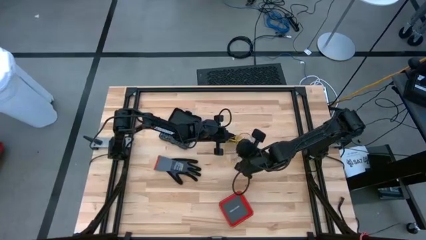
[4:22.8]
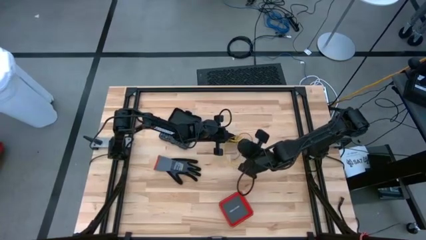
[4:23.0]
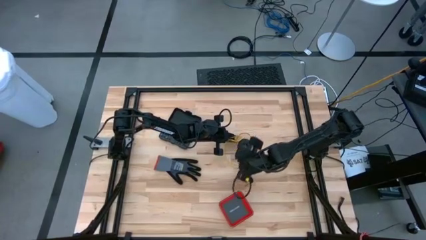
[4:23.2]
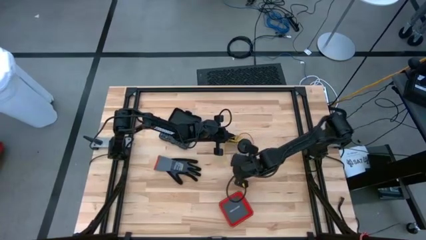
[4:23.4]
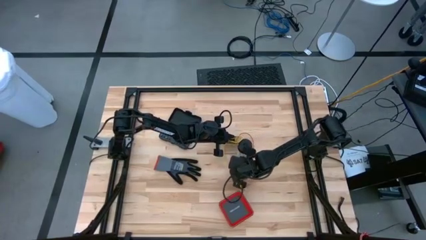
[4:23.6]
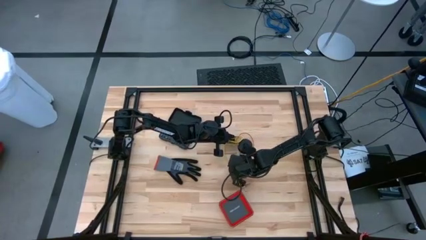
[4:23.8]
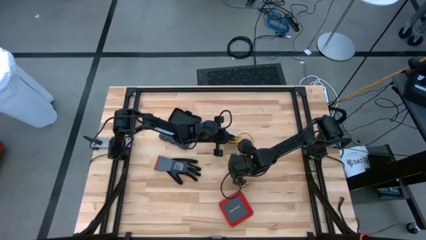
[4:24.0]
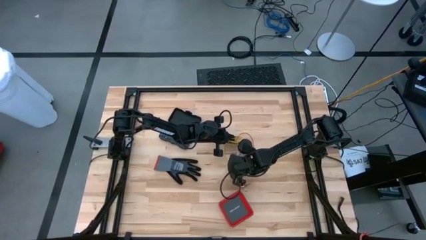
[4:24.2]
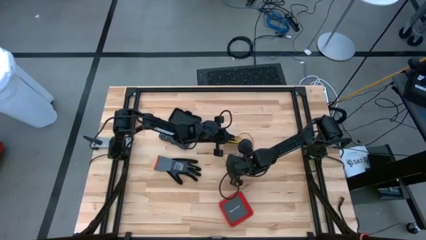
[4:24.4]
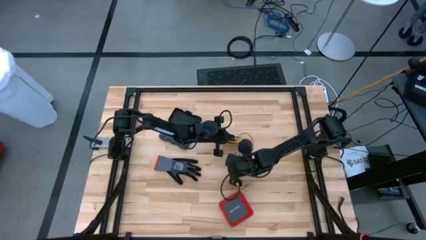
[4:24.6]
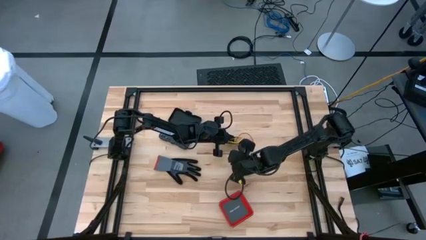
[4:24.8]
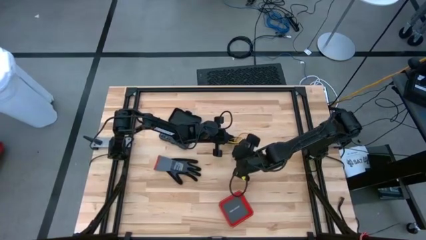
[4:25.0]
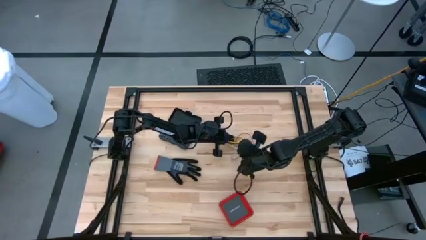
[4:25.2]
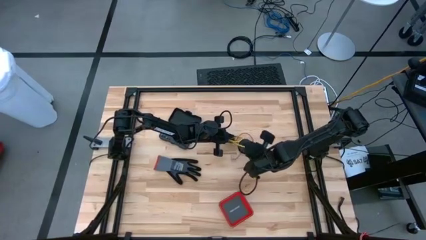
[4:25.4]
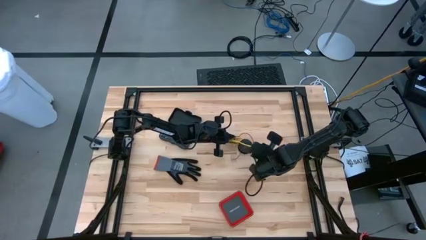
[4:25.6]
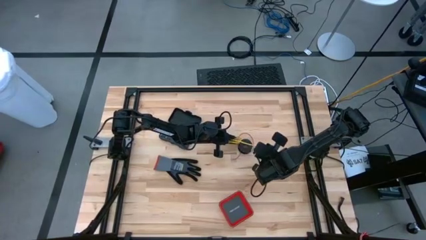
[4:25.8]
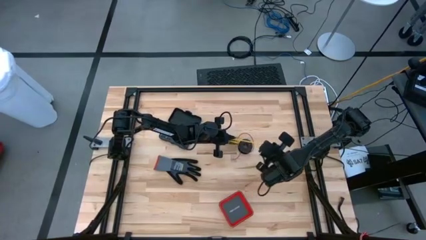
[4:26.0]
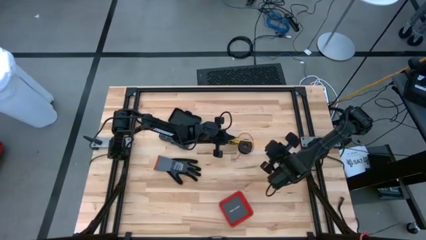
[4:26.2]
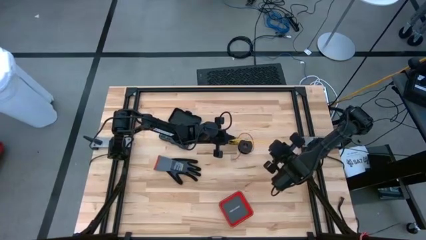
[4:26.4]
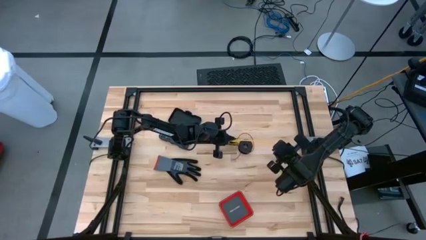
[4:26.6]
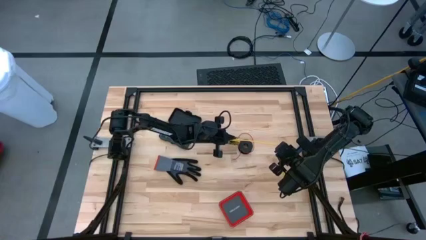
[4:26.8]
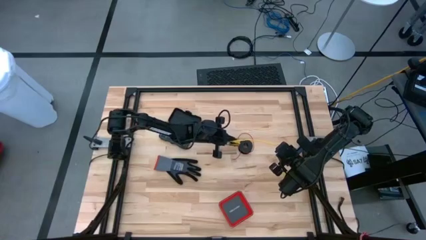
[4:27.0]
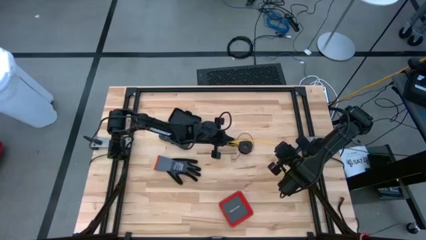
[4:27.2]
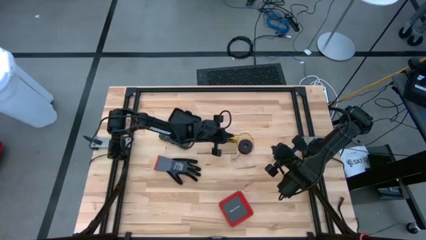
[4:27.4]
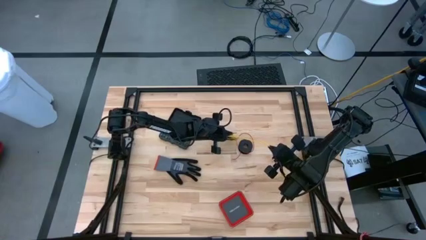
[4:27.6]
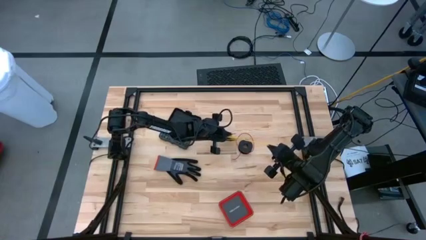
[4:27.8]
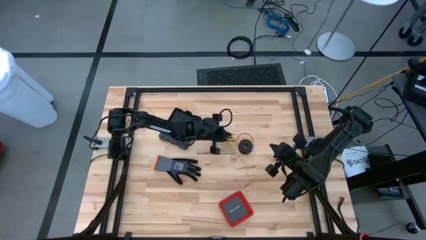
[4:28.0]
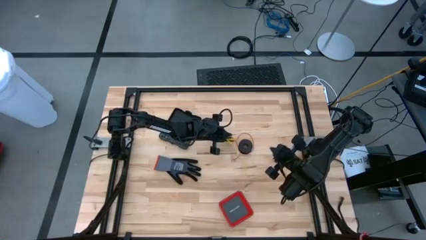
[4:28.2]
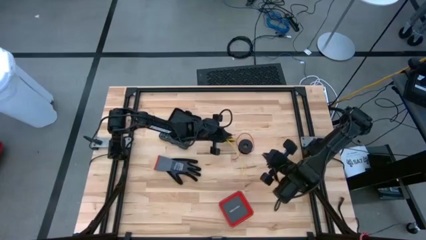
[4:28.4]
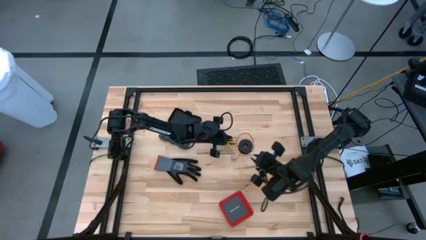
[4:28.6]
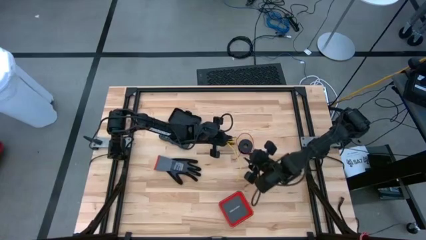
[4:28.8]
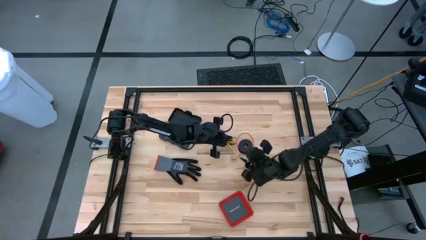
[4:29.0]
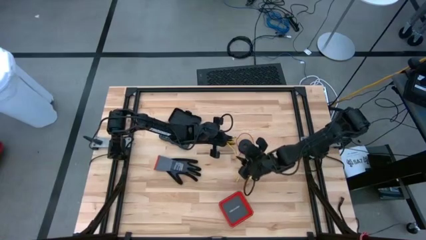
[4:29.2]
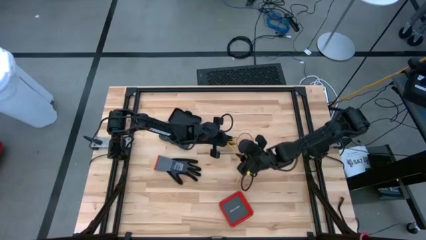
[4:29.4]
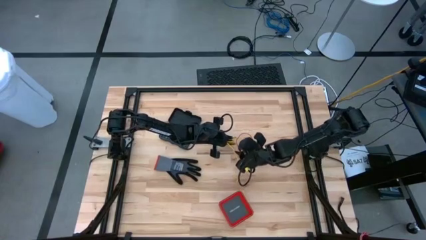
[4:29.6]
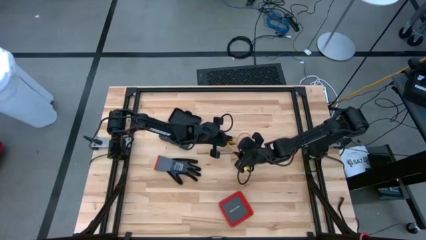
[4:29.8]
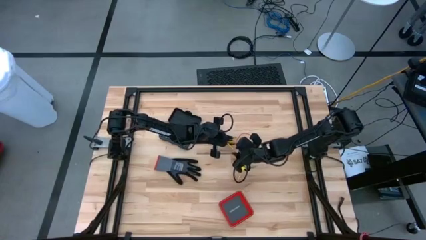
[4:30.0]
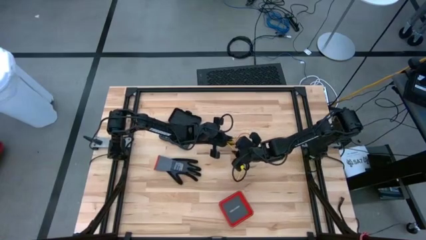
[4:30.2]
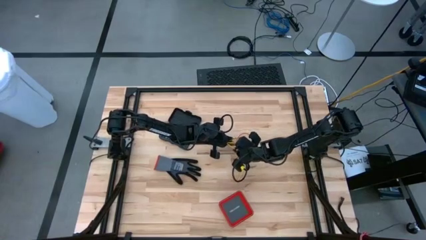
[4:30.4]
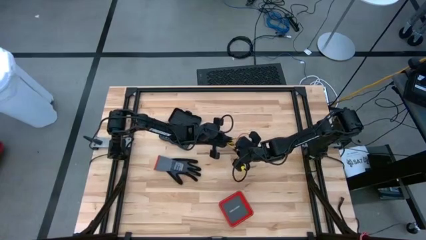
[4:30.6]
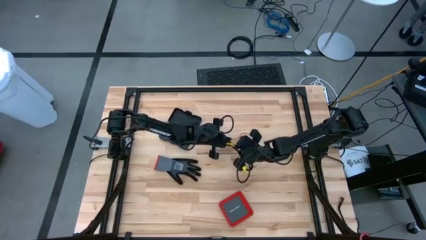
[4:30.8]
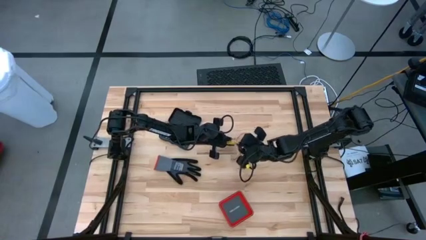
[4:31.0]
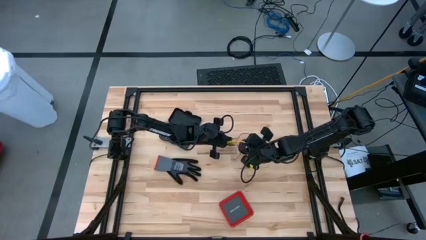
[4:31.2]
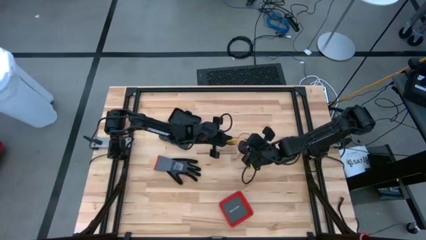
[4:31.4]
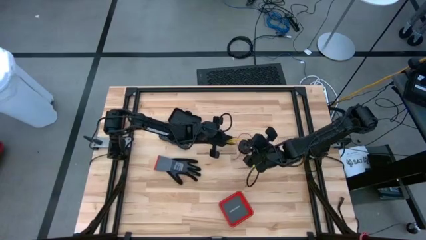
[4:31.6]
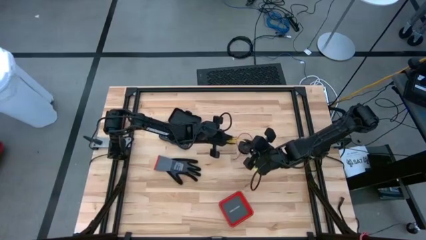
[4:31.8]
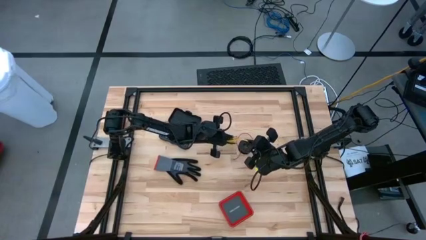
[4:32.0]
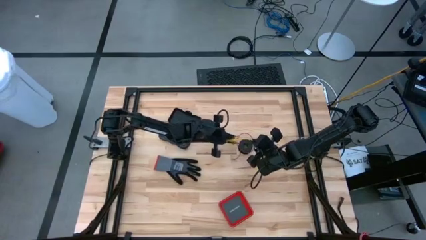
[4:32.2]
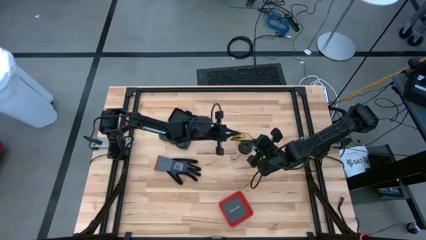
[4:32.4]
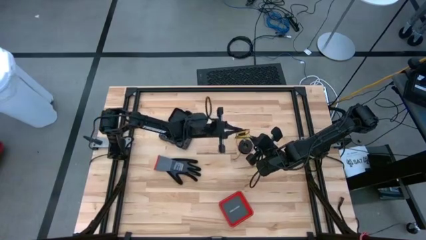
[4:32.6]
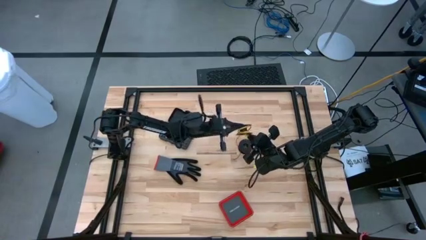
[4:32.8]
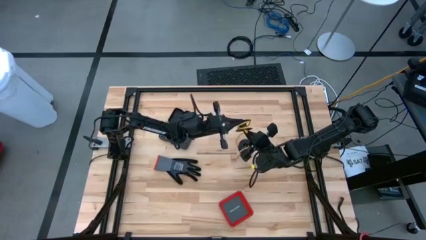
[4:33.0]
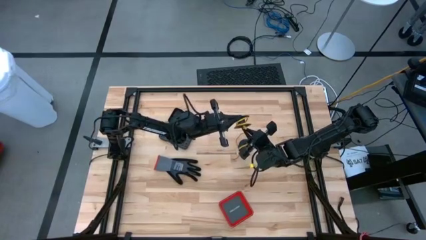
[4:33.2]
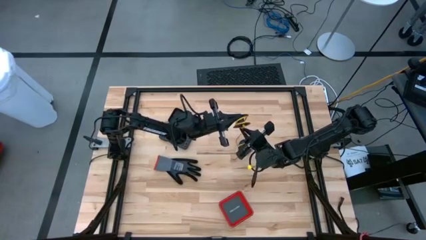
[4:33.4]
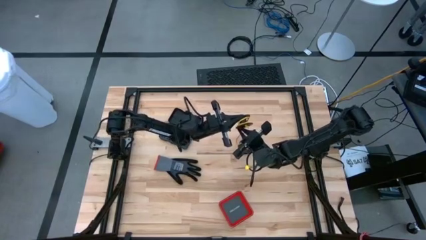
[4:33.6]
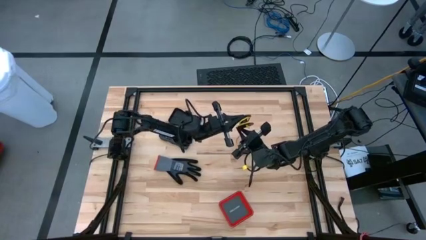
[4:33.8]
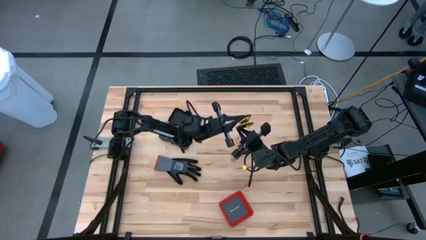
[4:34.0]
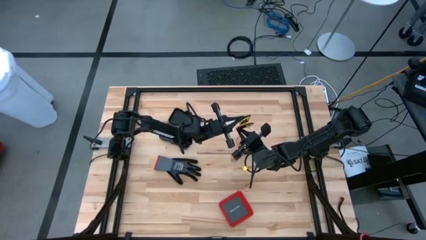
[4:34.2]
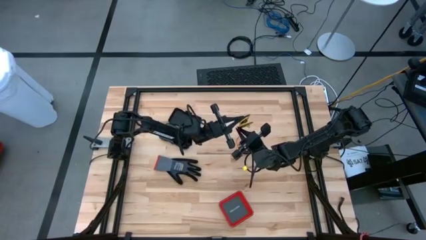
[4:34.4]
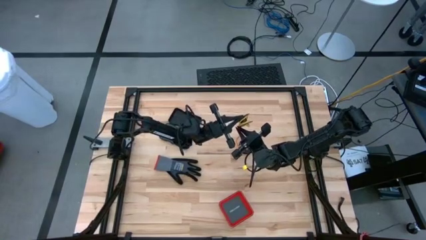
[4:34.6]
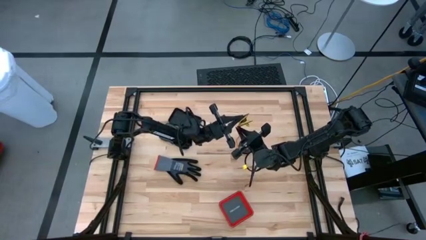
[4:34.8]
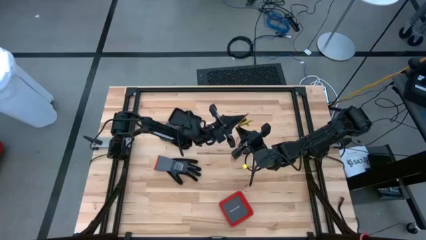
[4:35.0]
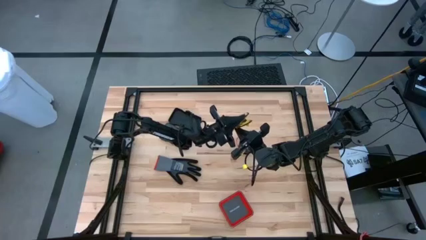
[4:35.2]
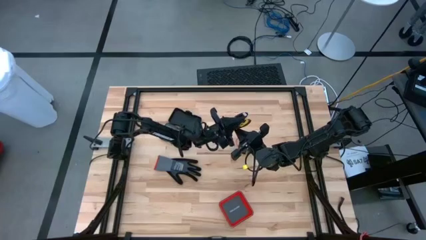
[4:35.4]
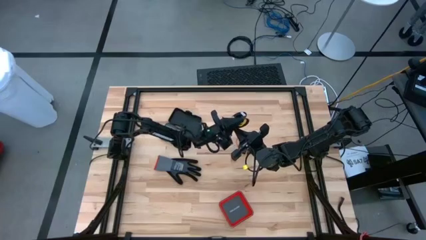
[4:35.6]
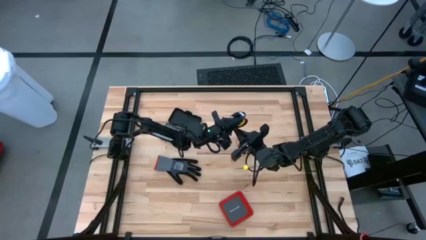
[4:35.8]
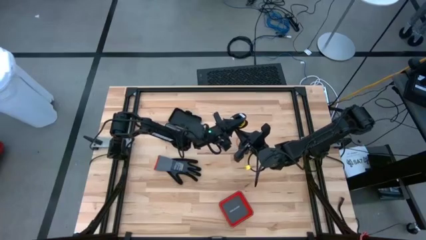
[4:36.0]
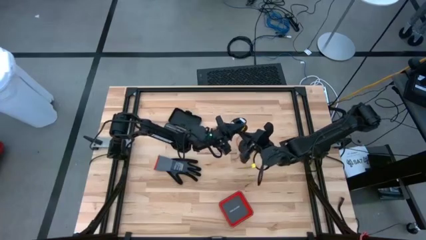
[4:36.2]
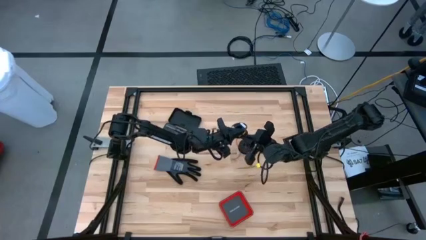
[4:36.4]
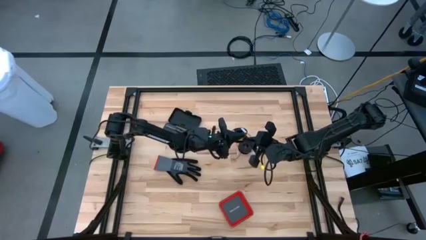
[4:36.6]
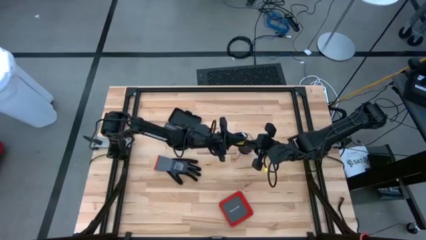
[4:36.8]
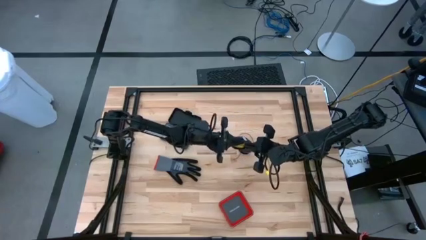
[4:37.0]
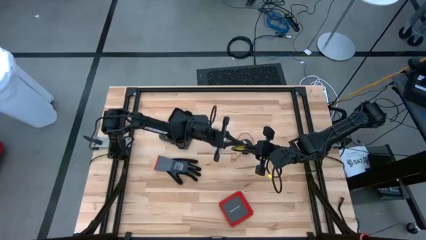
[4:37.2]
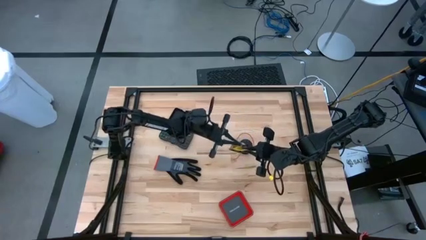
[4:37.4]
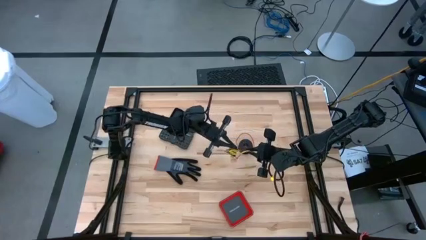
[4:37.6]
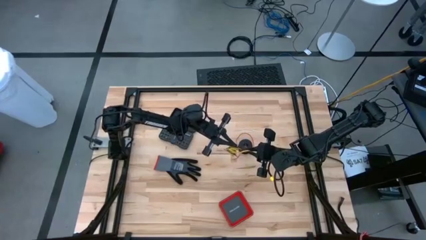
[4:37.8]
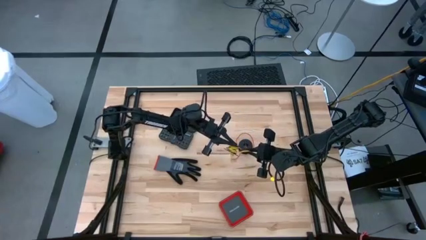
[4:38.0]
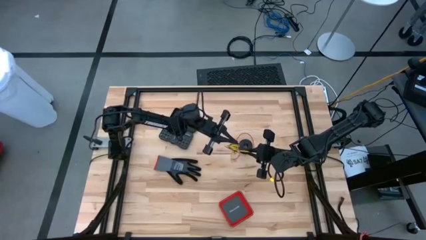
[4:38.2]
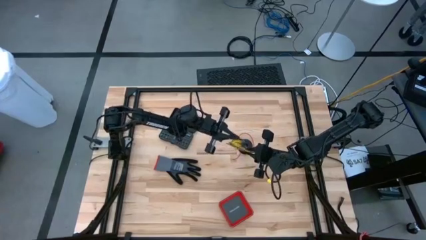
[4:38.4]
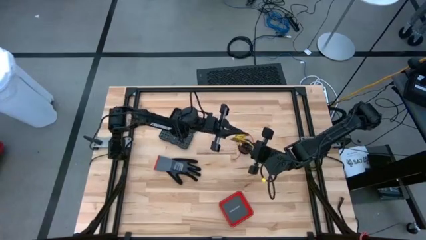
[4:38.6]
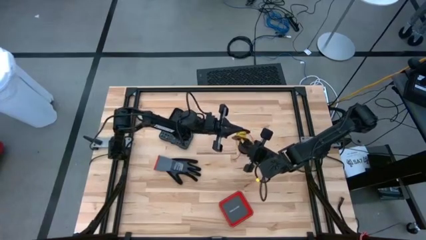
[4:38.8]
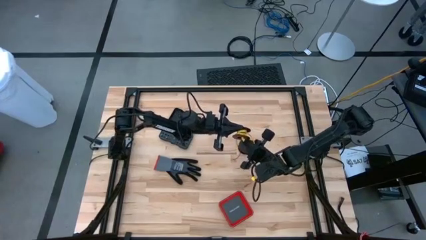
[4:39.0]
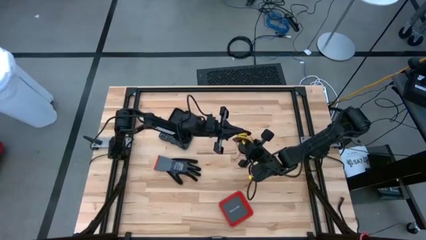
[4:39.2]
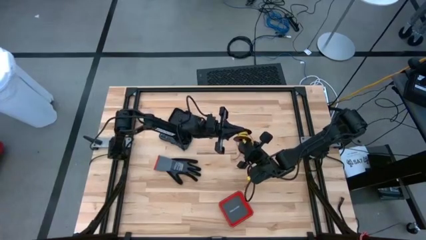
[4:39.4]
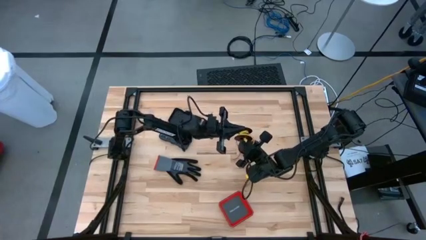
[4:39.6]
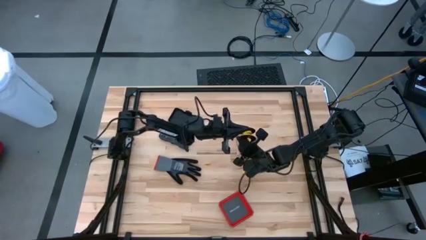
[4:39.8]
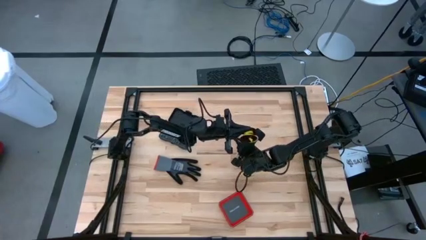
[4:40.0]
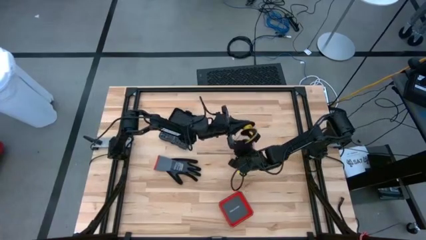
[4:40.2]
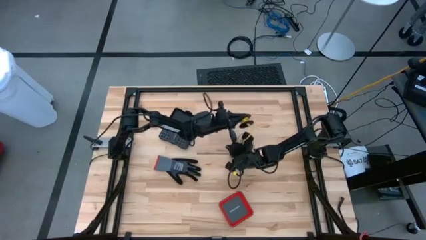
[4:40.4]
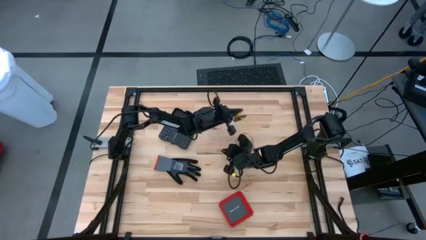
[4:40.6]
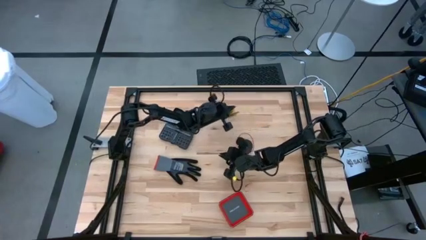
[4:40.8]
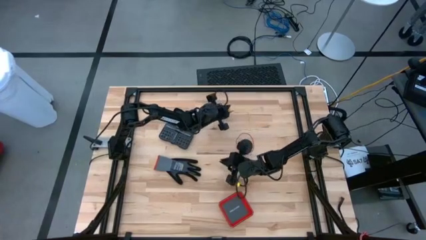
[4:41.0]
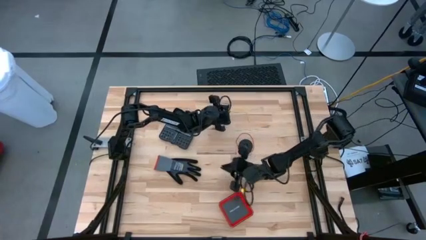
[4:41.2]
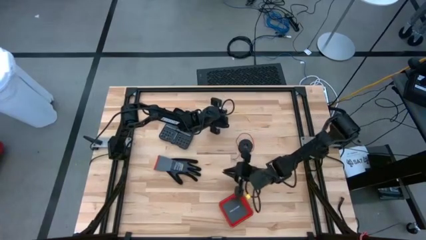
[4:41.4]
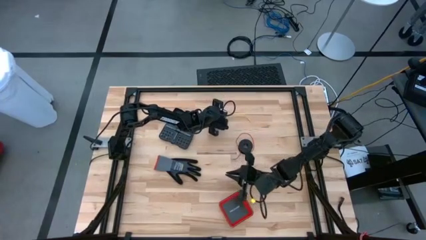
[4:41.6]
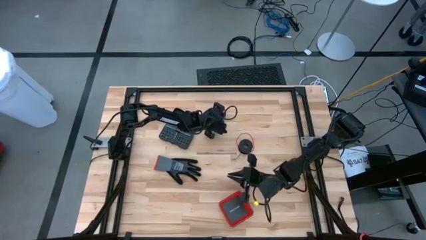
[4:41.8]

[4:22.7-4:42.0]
Task: Coil cords
Coil the yellow wire onto the spool
